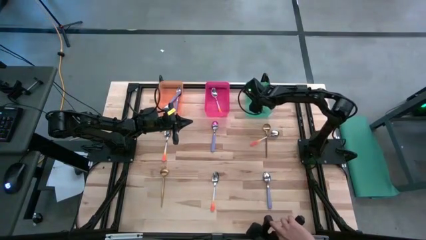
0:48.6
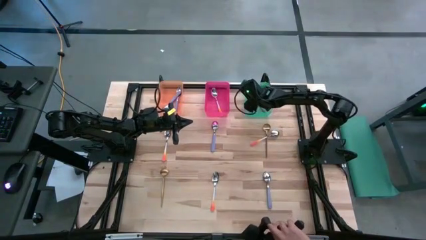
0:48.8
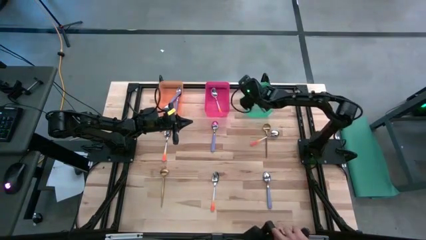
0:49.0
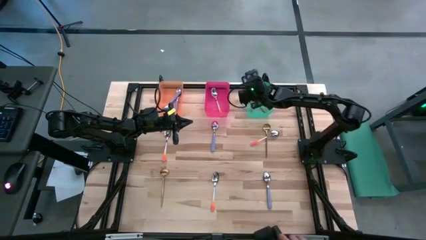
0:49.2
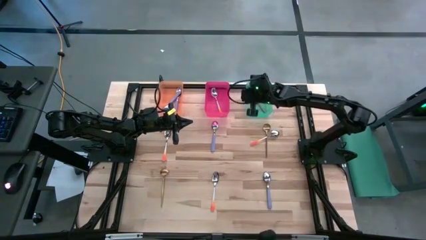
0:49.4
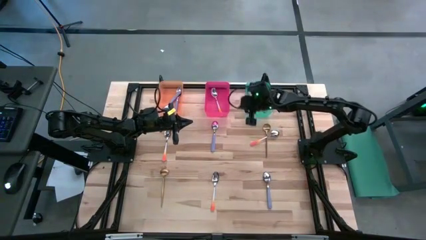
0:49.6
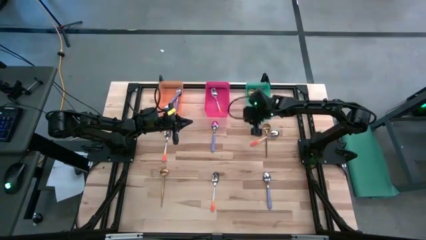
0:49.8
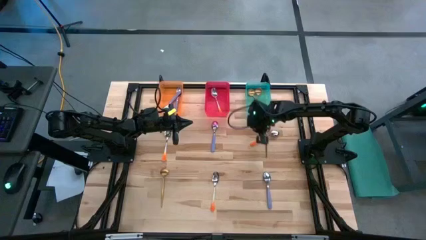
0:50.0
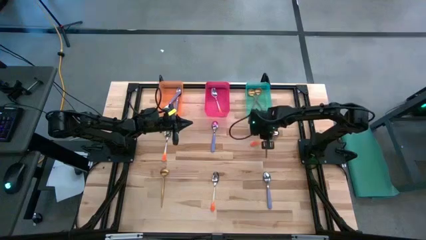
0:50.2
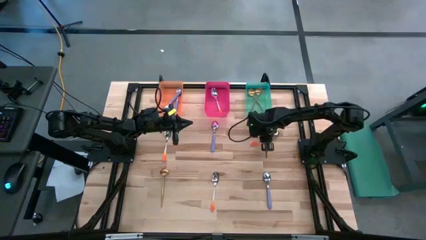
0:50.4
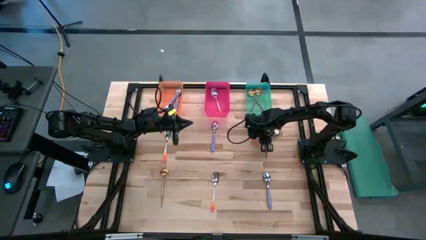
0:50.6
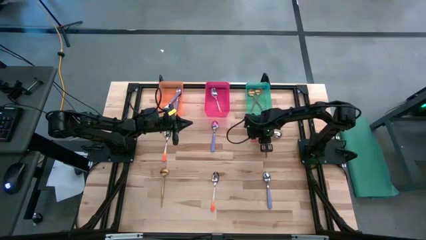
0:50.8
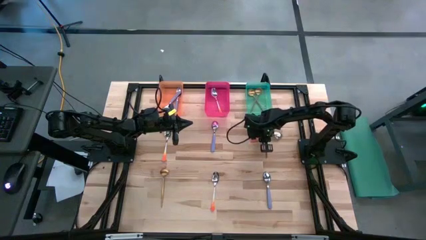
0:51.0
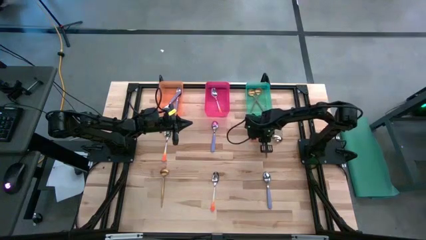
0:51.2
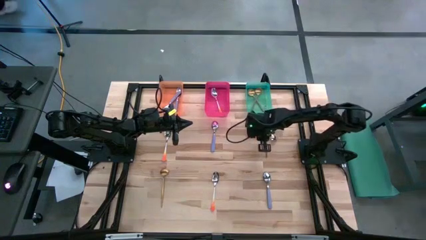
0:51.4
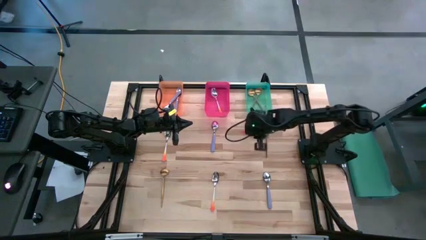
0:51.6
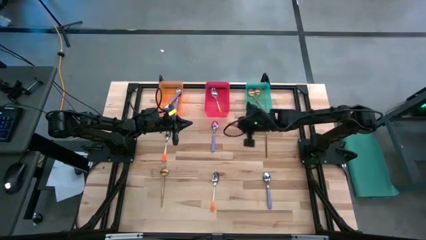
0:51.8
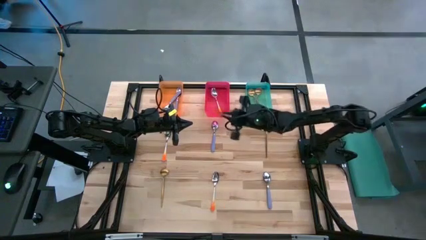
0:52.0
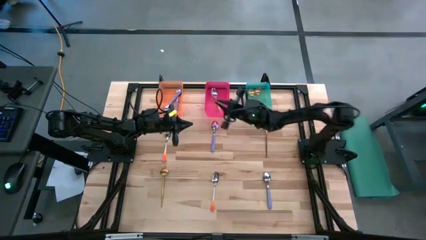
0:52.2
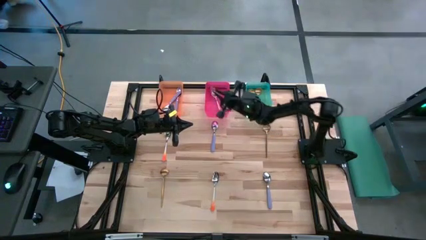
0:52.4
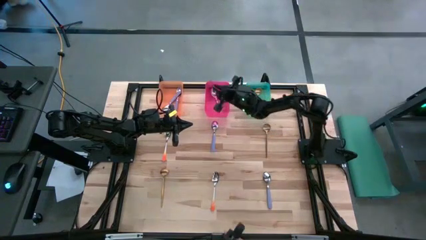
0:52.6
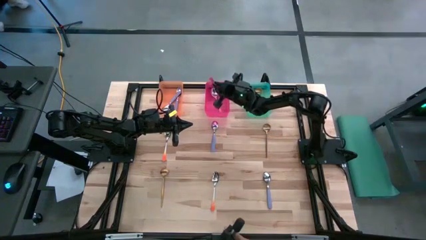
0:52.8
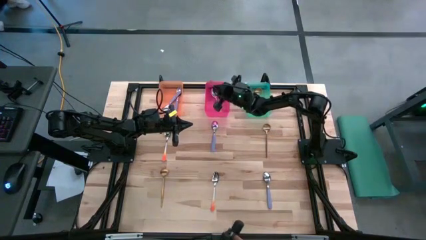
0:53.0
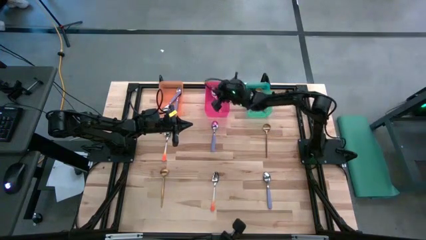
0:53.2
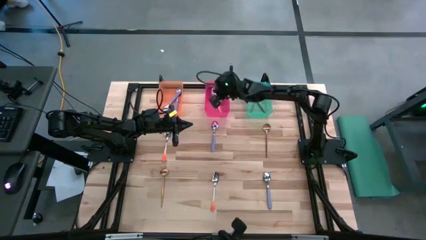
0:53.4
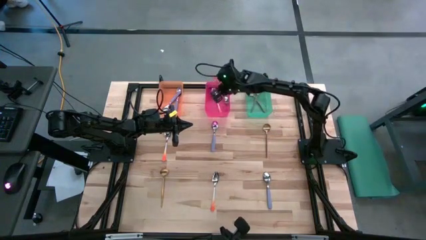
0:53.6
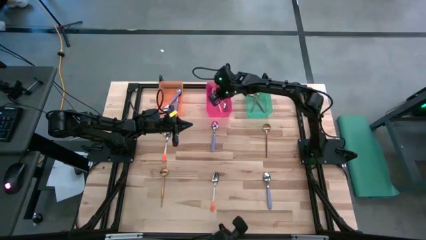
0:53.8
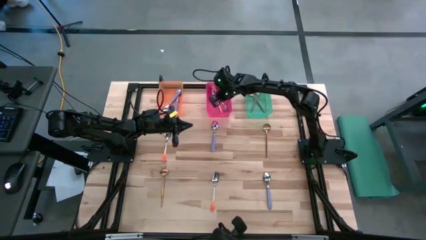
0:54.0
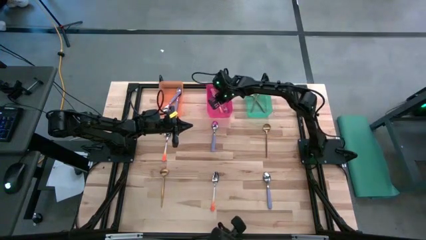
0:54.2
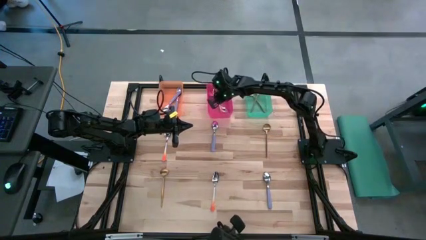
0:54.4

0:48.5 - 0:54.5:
Task: Sort silverware by color (type)
Put the orange spoon into the pink bin

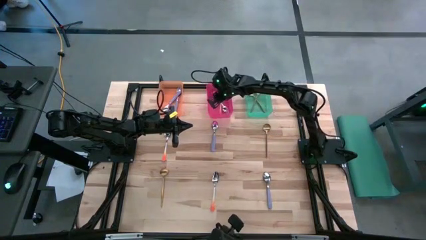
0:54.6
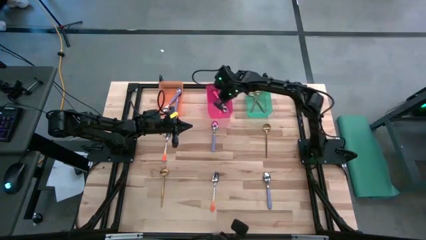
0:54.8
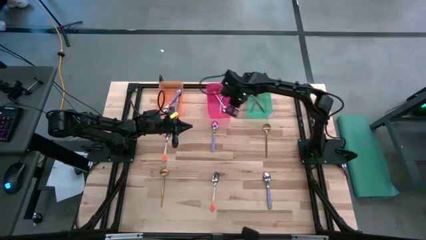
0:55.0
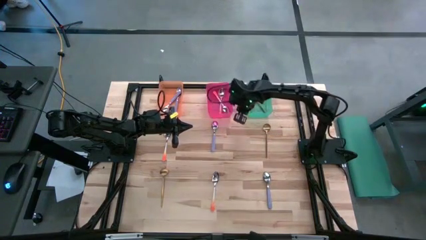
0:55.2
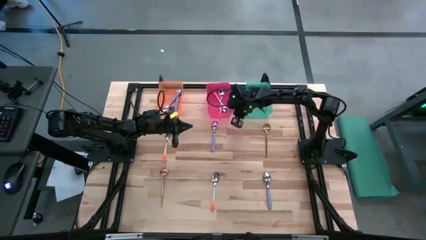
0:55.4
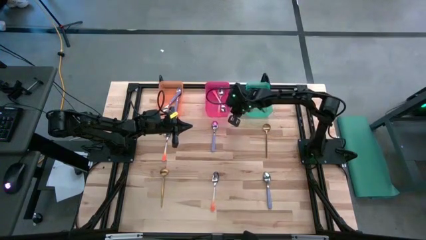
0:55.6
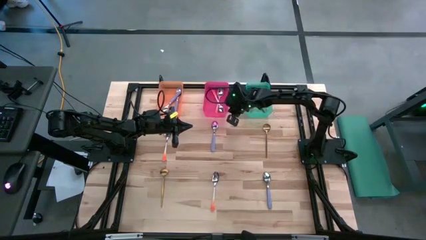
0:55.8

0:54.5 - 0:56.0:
Adjust the pink bin

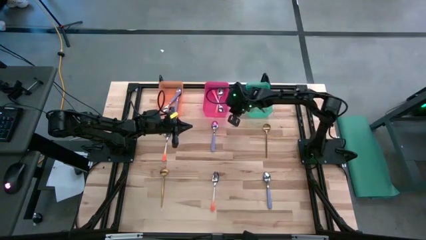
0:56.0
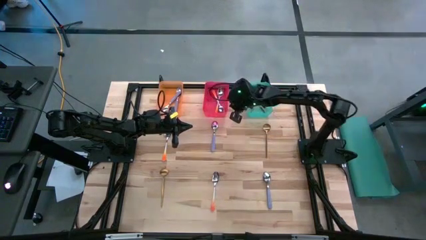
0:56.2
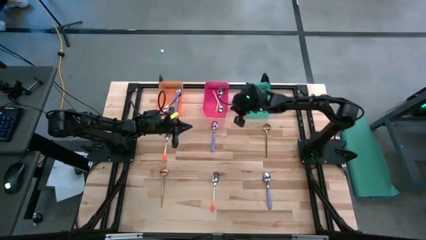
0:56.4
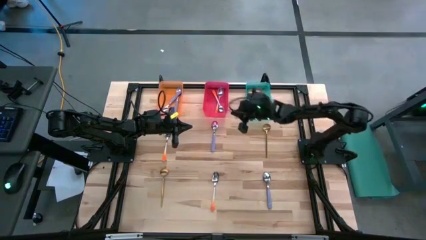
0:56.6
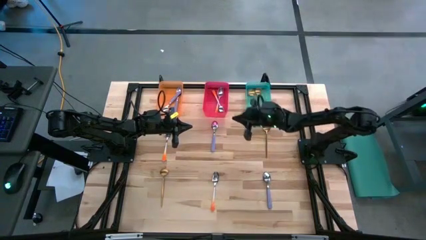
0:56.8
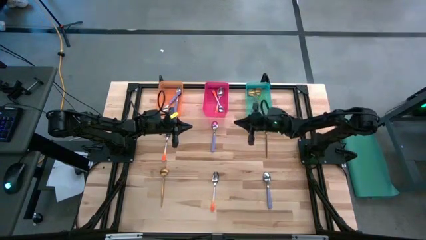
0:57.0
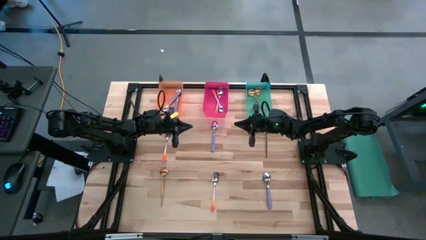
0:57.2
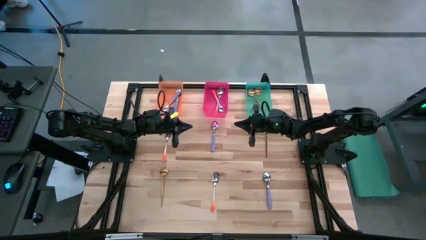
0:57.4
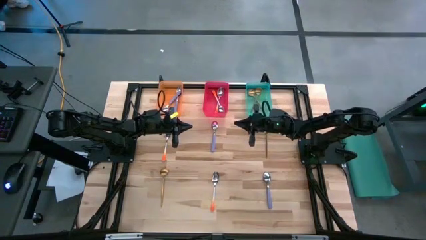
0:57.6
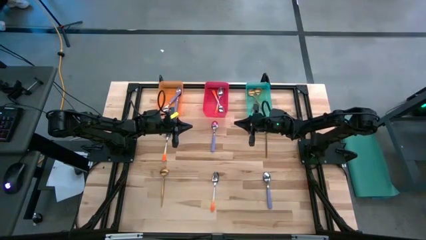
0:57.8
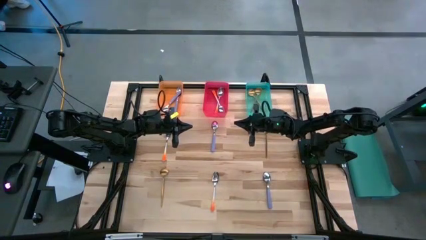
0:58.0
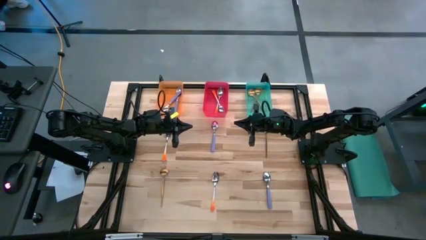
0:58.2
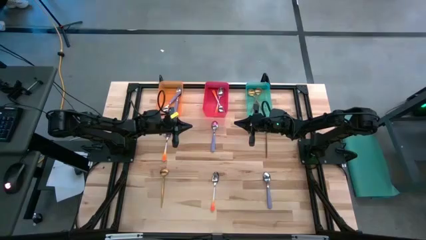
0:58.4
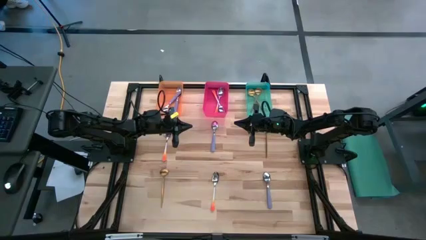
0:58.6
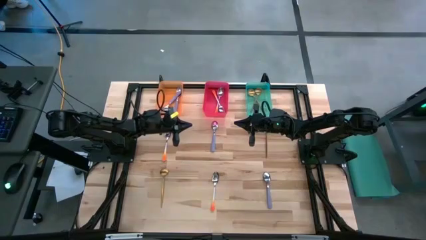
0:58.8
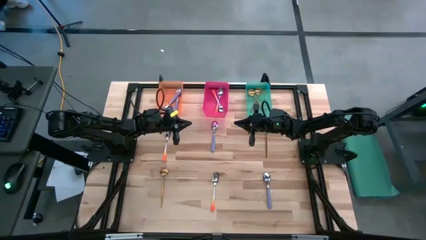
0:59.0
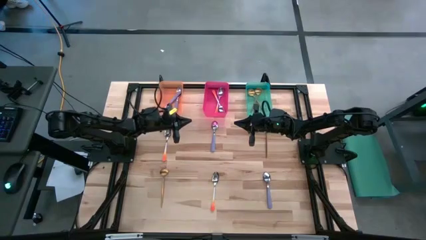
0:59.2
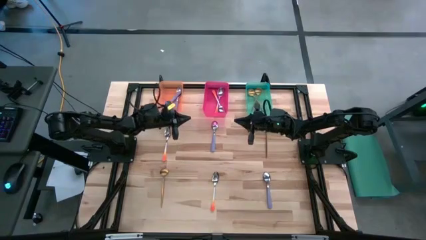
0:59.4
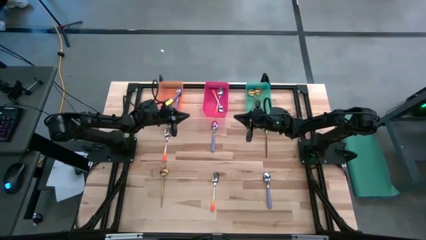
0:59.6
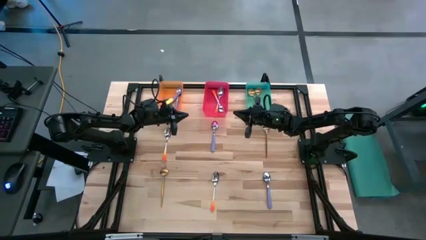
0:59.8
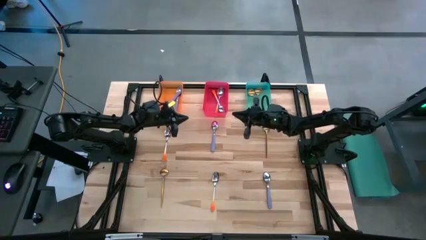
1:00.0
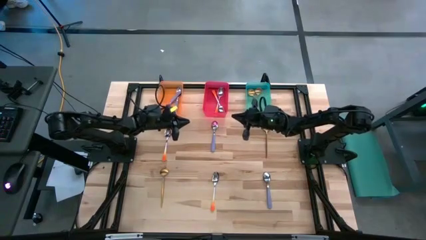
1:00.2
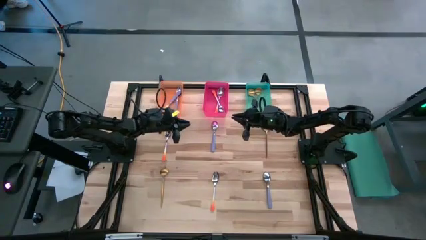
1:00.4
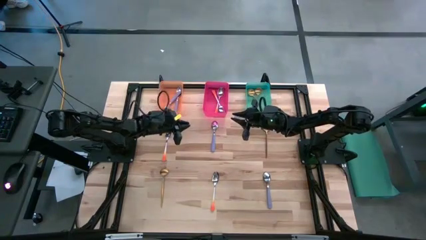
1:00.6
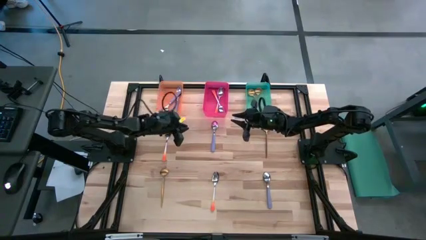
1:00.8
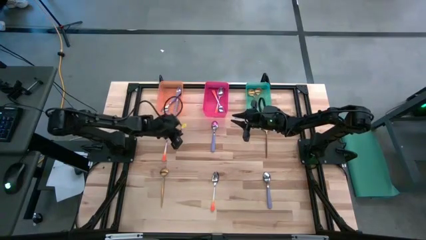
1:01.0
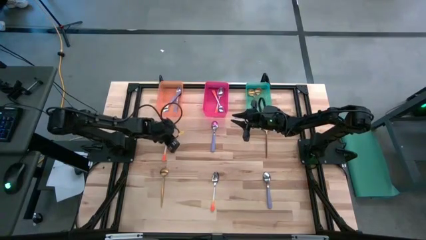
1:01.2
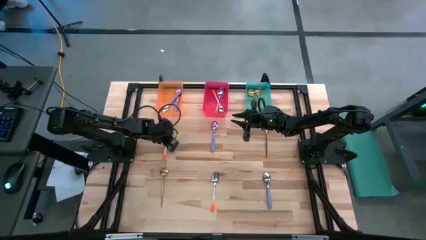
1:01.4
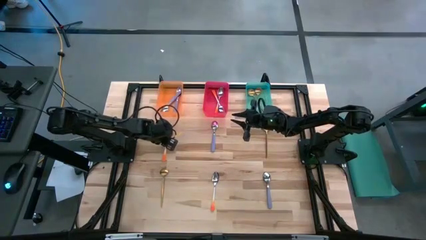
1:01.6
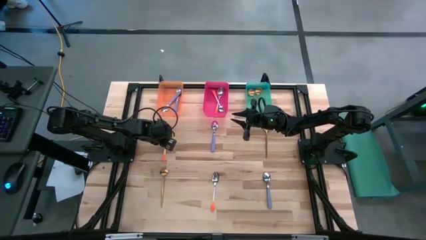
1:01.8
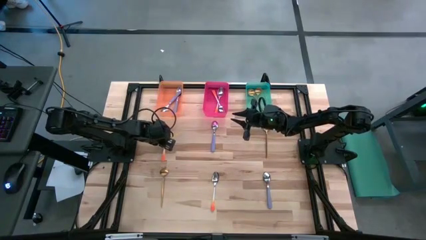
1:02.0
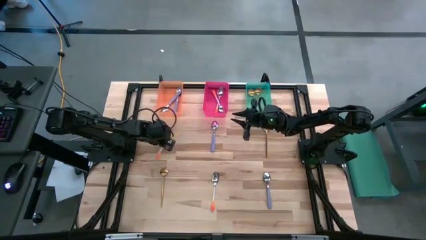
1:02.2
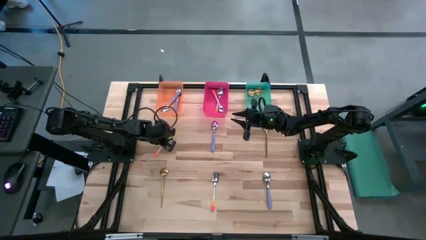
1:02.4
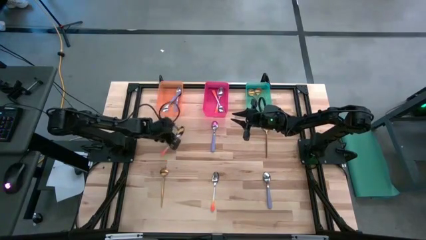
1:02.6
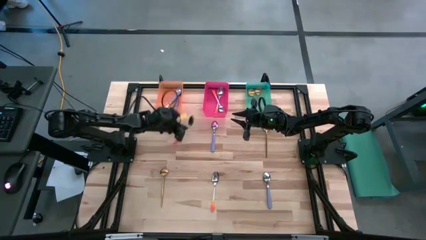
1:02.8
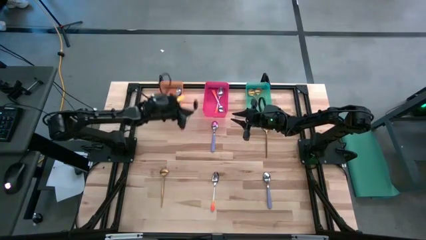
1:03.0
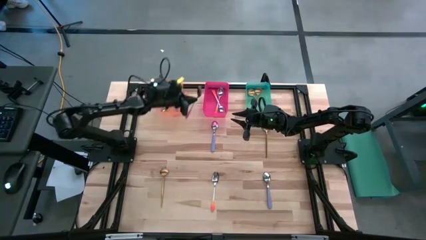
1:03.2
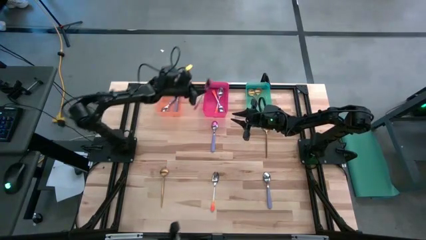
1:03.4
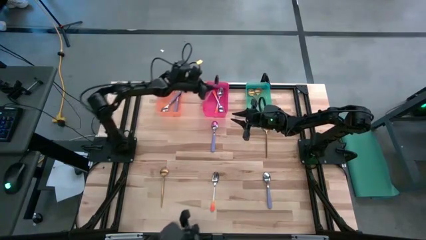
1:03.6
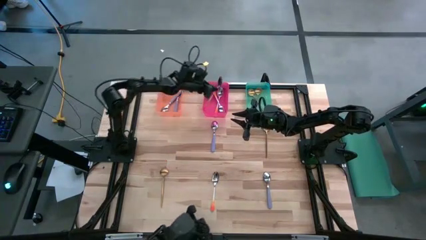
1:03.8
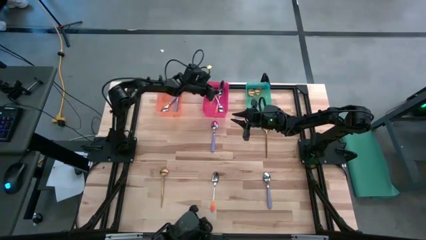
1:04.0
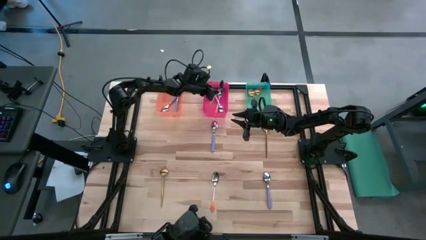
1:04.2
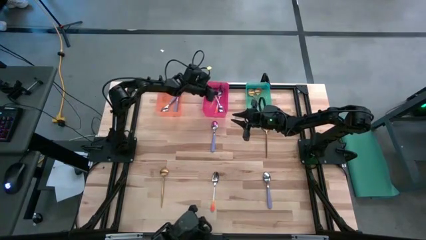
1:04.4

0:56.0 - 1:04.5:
Put the orange spoon into the pink bin

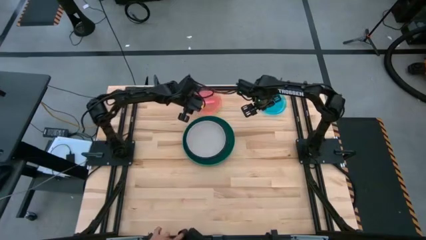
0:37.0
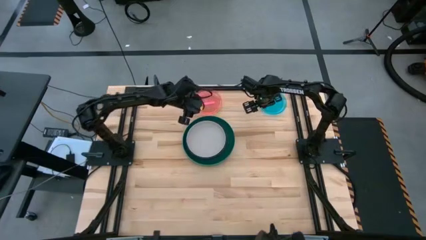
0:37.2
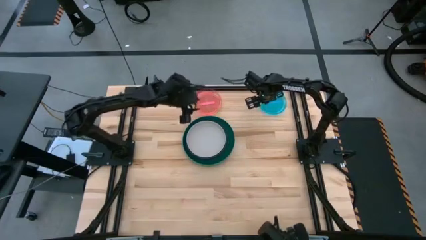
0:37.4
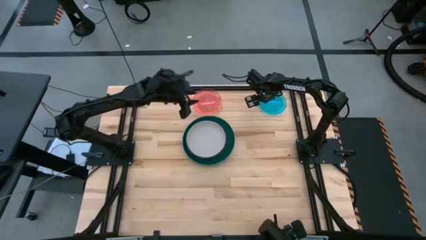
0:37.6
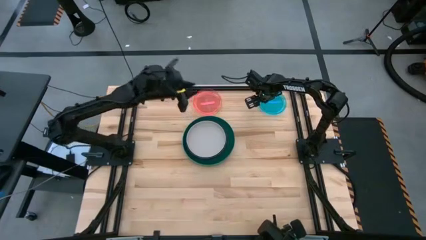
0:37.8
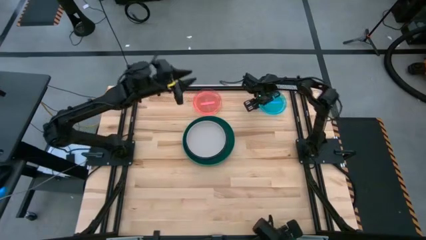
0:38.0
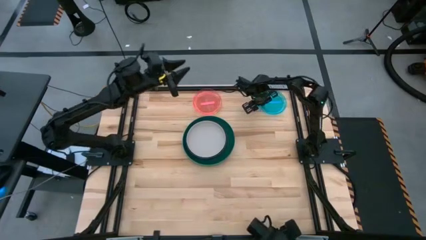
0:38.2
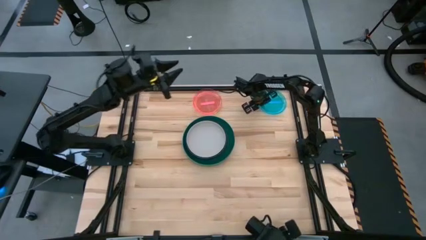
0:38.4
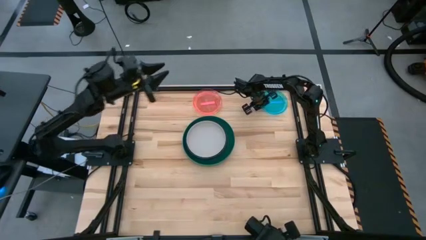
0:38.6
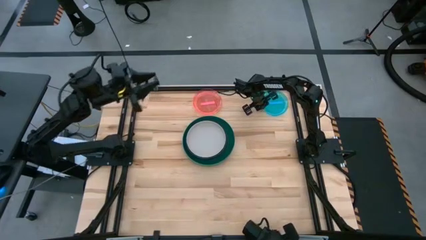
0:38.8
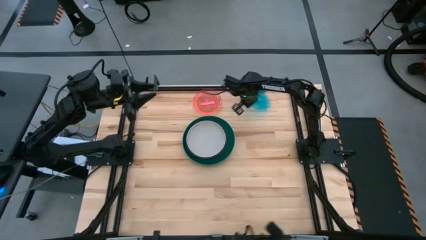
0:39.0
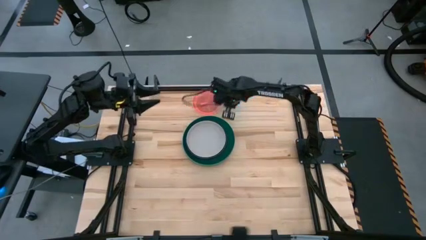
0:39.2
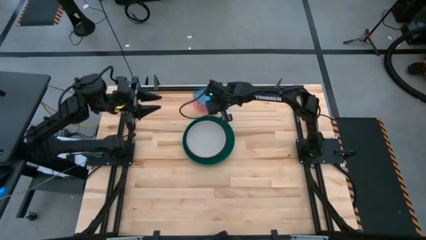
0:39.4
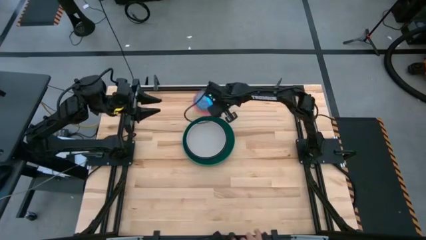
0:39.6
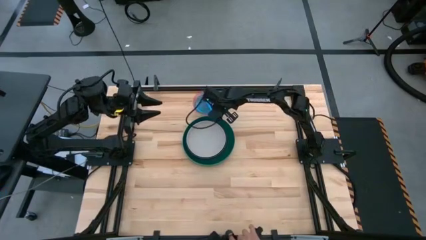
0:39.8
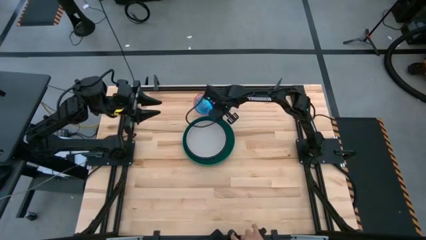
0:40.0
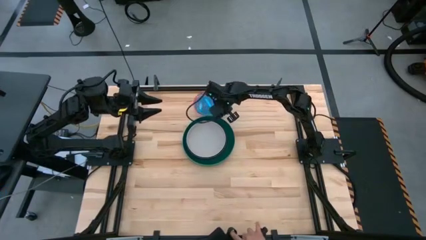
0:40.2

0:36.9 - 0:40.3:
Task: Stack plastic plates
Stack the transparent blue plate on the transparent pink plate
